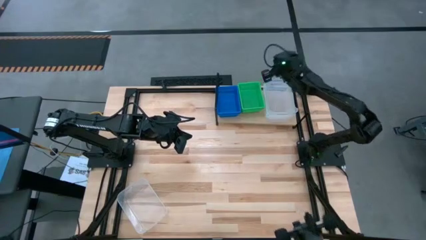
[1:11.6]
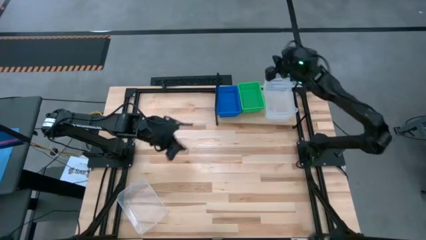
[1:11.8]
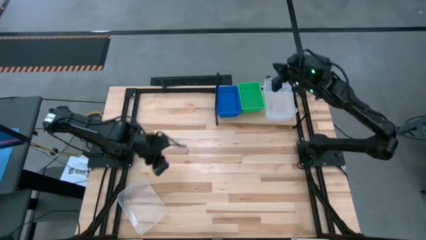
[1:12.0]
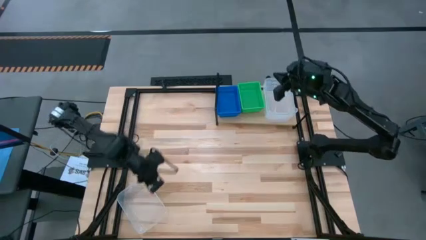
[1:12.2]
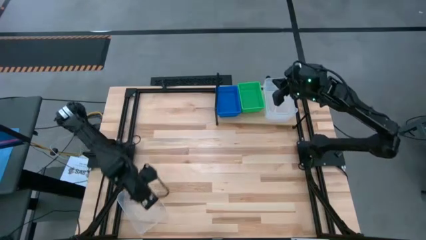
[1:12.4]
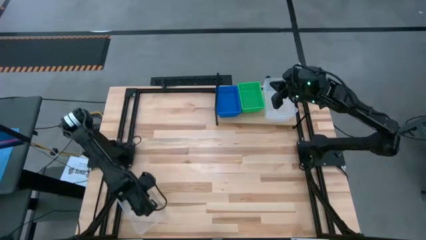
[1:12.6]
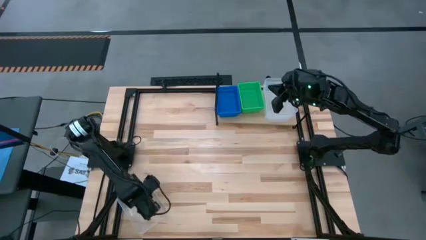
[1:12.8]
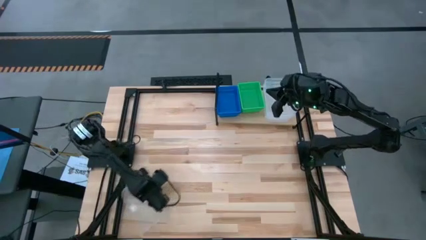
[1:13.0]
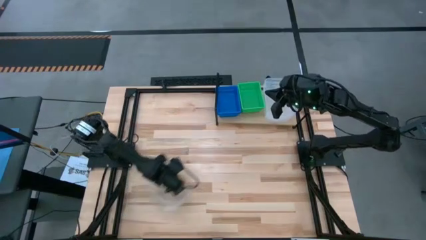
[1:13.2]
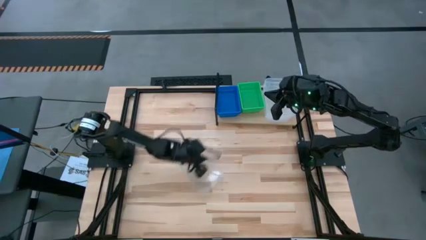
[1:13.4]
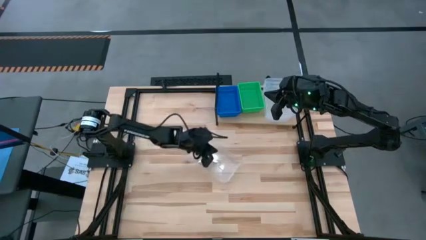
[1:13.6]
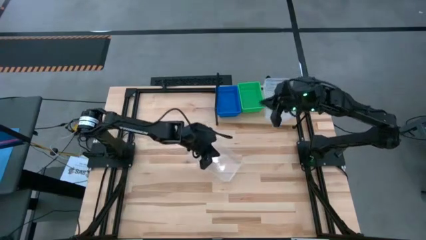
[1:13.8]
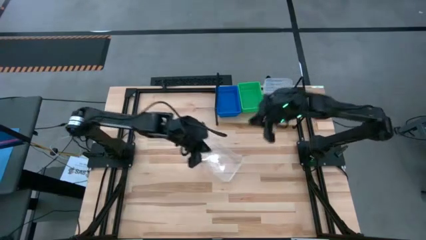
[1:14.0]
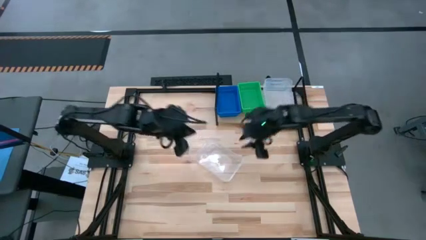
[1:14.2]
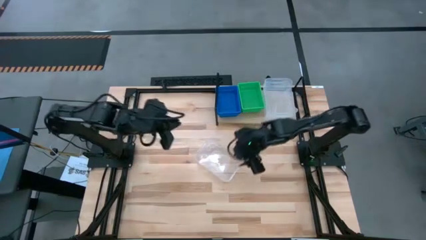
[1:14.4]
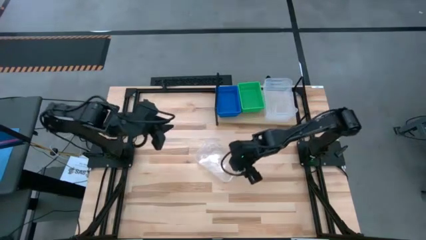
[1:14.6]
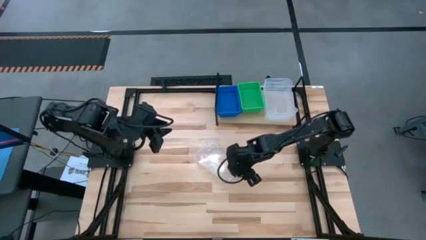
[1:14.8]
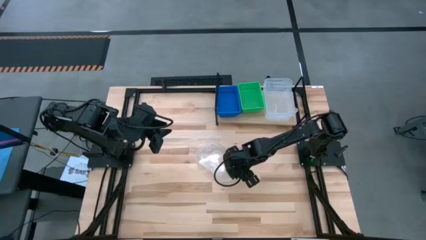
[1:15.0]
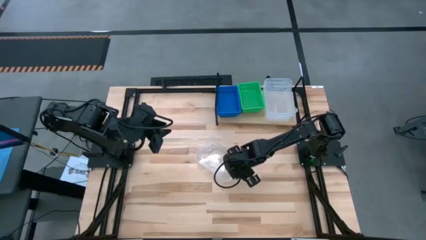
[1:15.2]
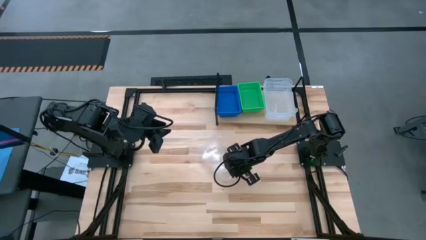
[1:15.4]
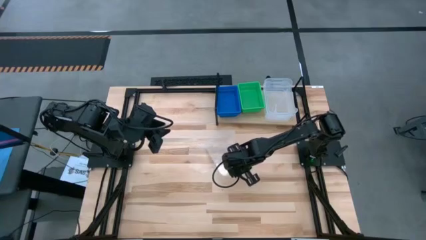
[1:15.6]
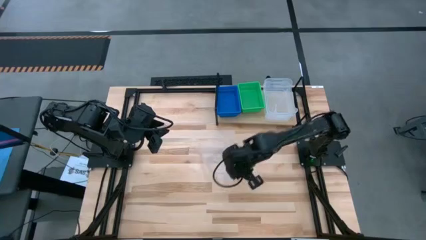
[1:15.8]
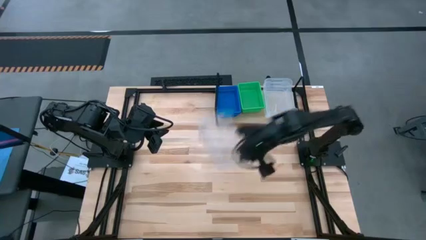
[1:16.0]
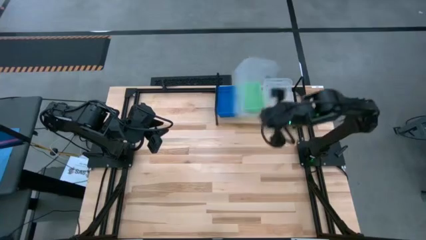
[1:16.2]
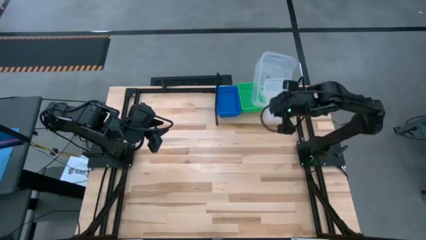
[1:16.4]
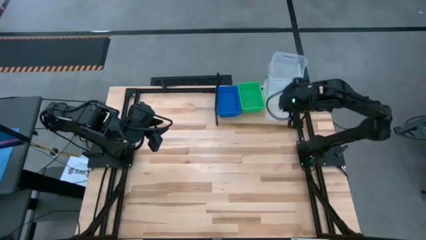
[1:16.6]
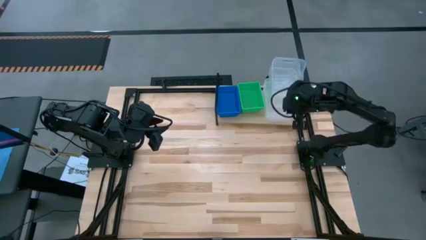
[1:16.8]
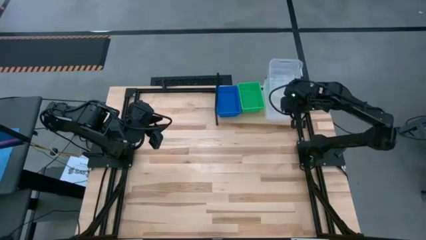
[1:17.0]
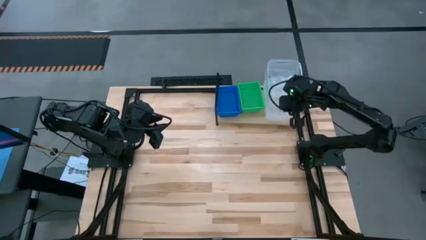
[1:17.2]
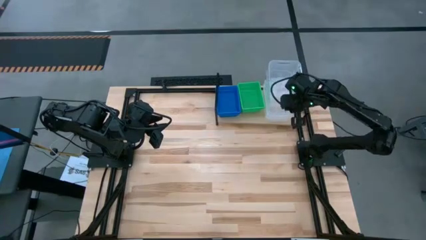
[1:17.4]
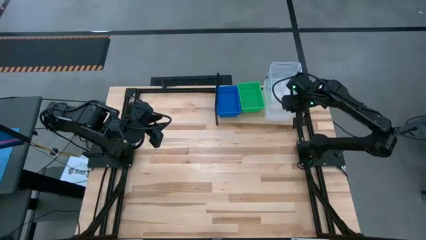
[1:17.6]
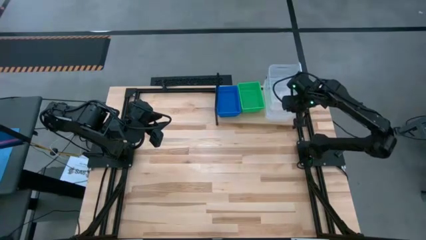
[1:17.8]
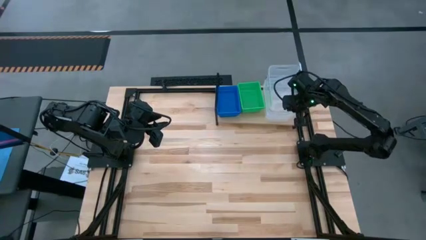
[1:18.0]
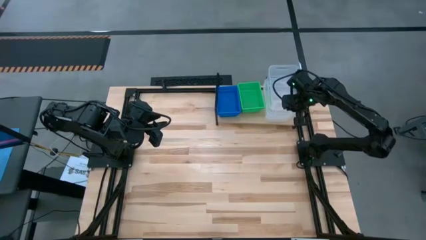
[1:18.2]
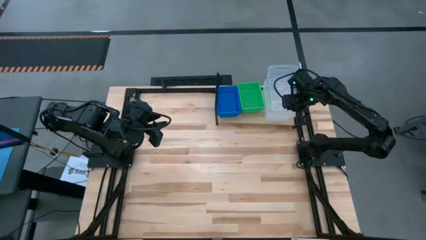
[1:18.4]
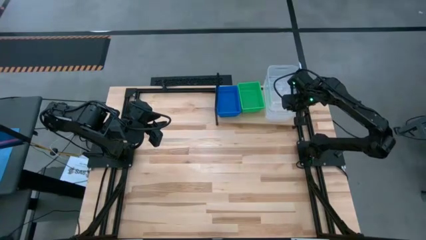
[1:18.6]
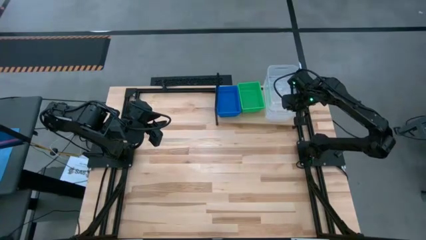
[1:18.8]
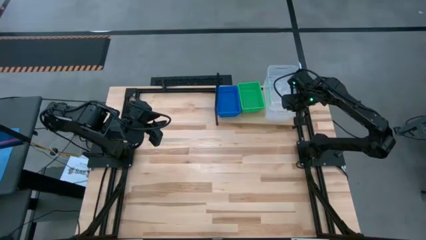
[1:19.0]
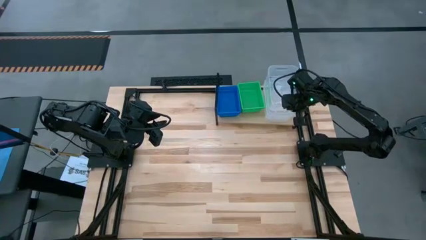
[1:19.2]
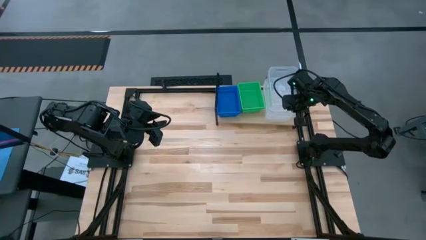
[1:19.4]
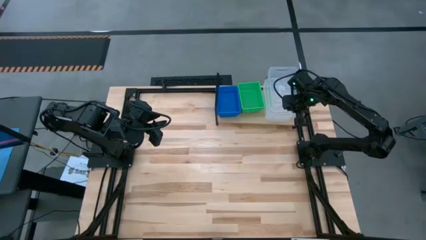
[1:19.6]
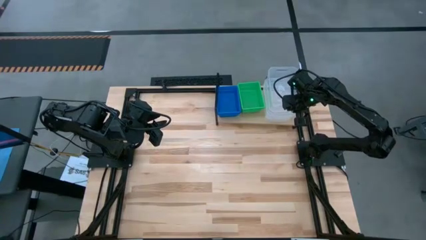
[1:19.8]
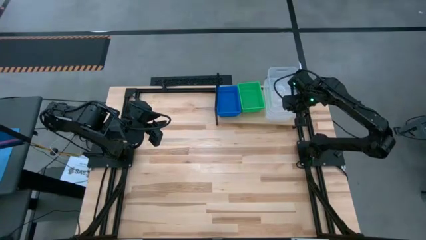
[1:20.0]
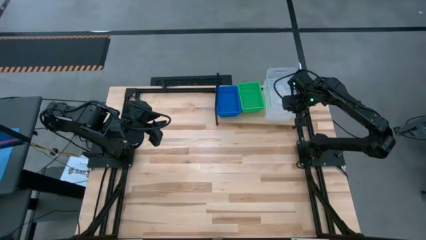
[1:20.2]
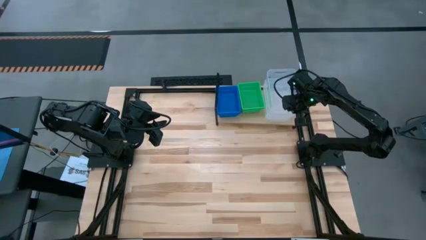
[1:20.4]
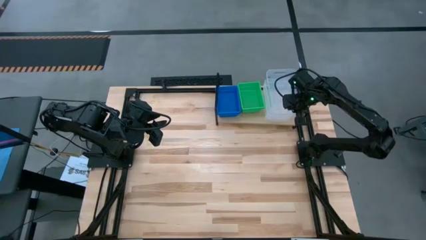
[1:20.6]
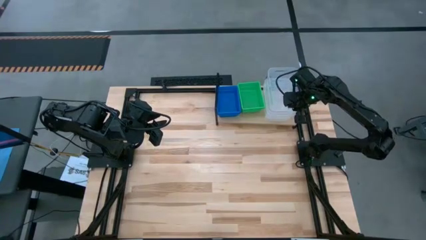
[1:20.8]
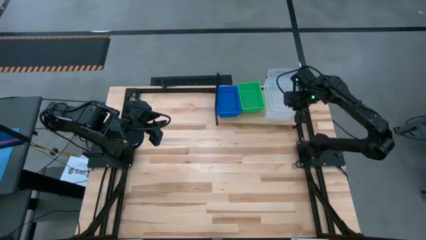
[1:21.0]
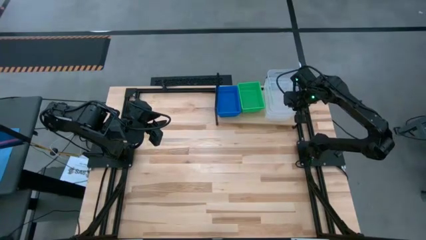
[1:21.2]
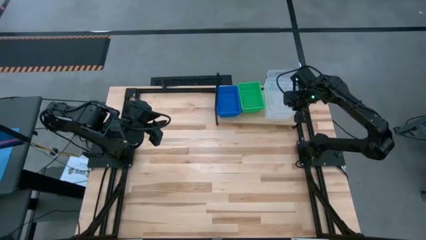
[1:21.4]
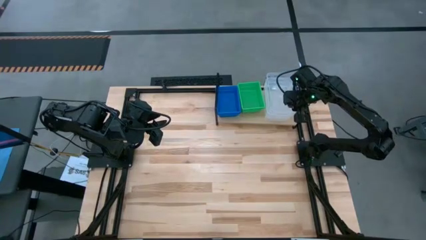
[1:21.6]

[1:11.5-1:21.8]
Task: Stack baskets on shelf by color
Stack the transparent bins on top of the transparent bins on the shelf

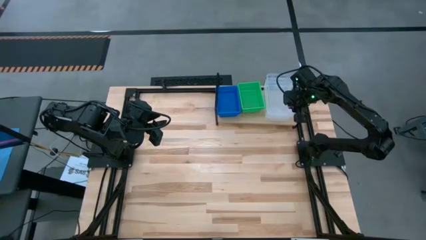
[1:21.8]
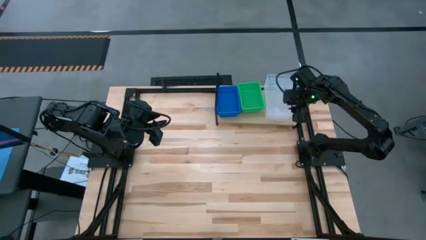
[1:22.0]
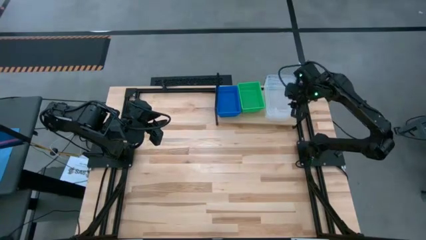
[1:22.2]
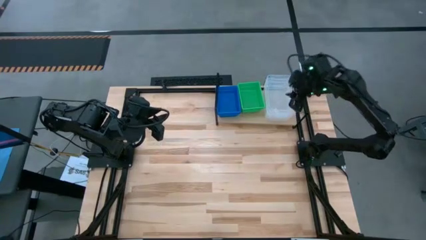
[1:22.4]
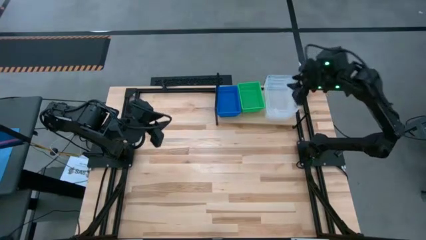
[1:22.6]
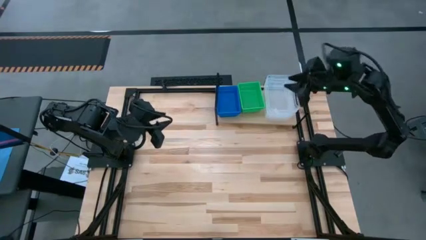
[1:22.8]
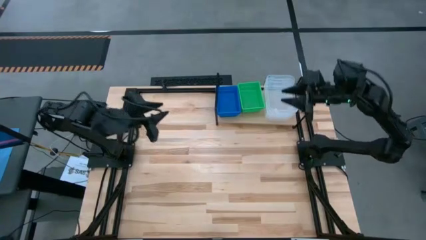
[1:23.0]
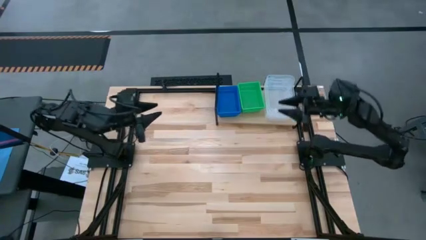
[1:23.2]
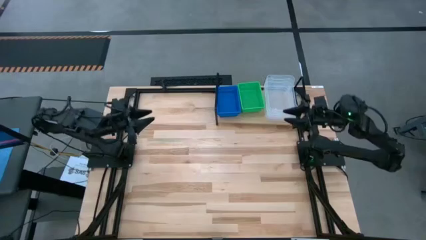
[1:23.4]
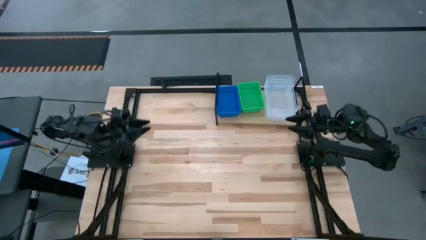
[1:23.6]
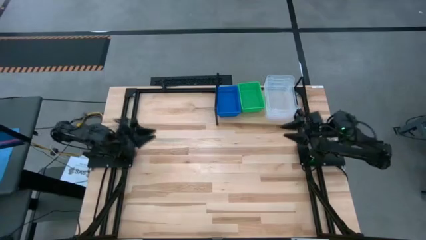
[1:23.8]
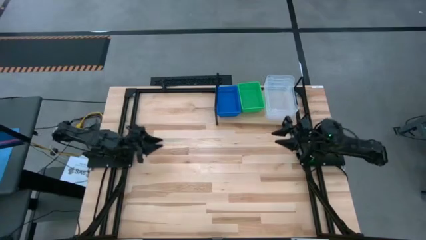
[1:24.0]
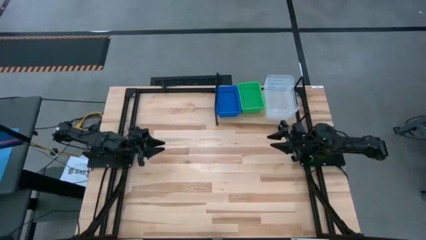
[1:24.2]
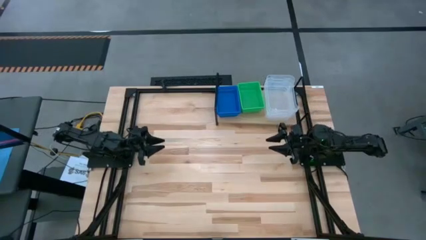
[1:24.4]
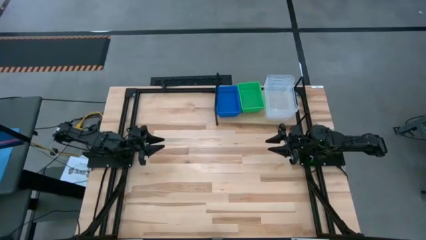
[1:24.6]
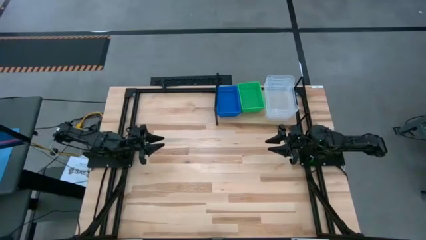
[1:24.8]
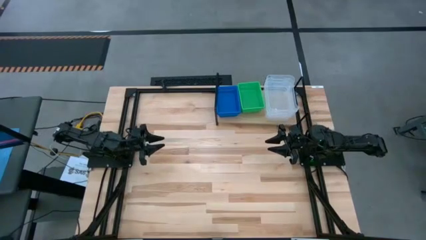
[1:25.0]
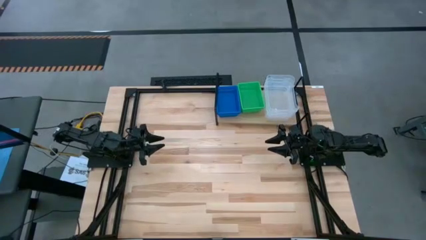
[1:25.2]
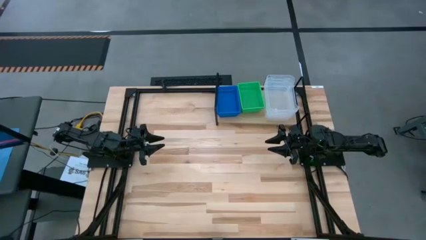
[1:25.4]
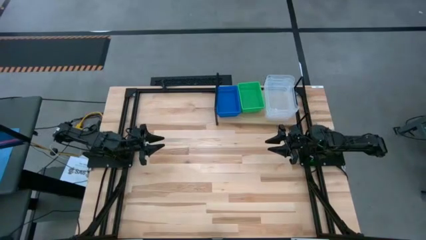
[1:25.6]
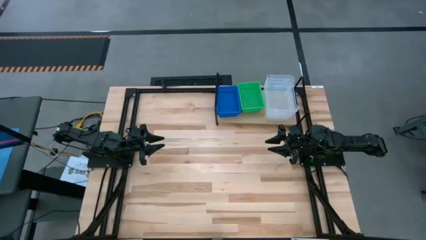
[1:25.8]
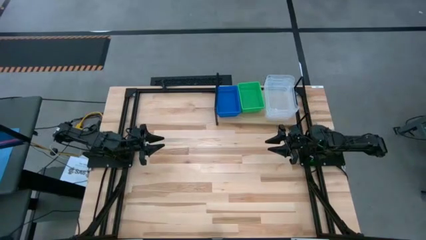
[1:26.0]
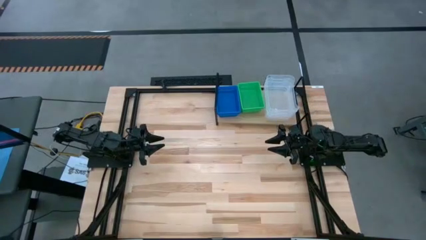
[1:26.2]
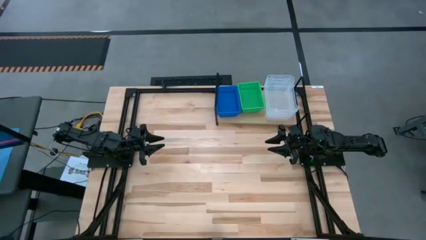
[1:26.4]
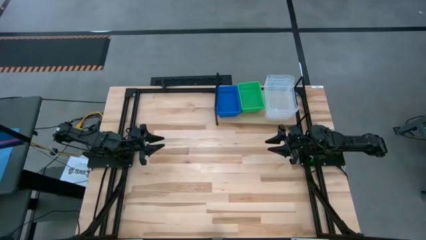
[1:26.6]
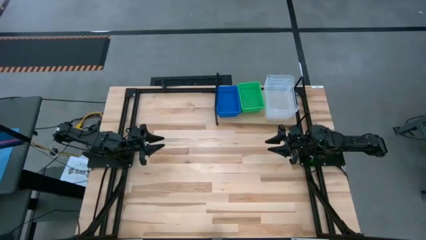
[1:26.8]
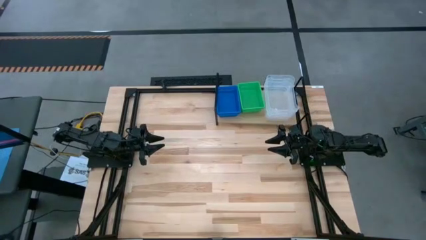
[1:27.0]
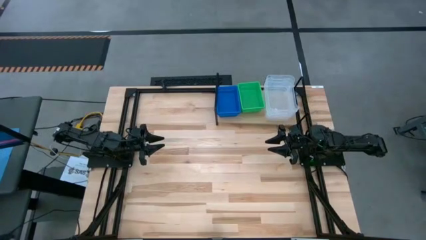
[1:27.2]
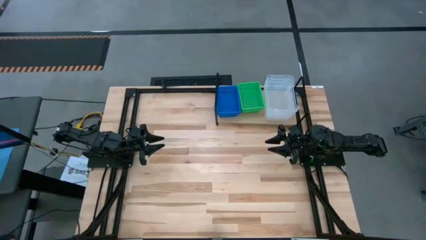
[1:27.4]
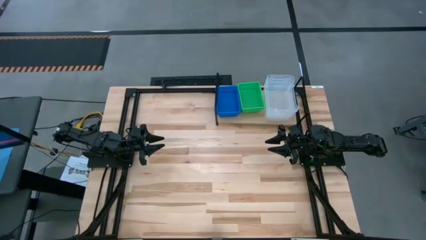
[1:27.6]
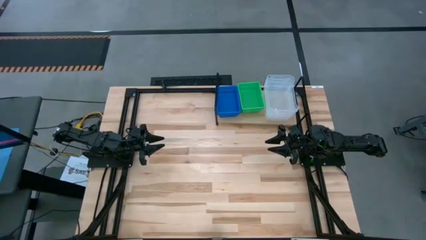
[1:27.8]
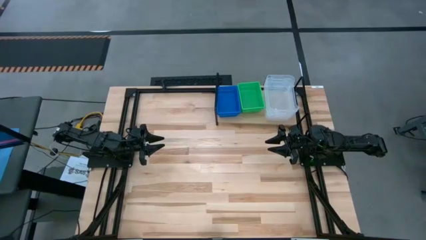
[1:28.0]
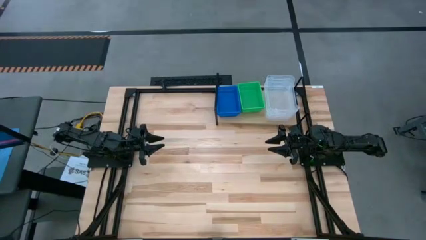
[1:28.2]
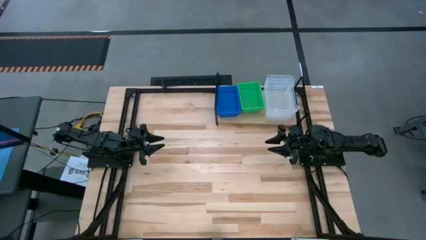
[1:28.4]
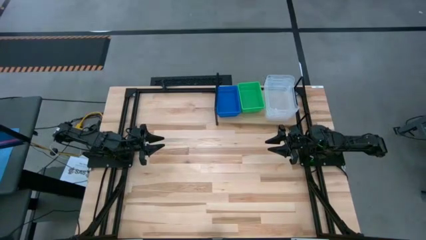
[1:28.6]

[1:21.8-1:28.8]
Return to Home Position
